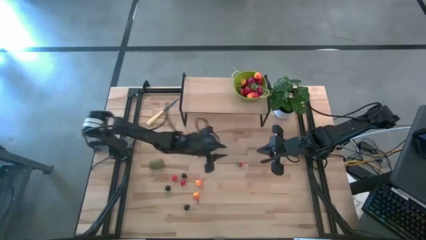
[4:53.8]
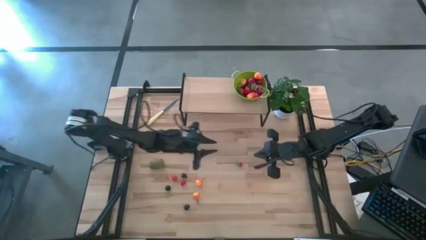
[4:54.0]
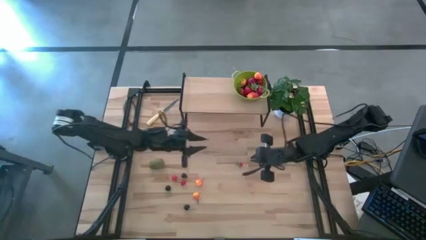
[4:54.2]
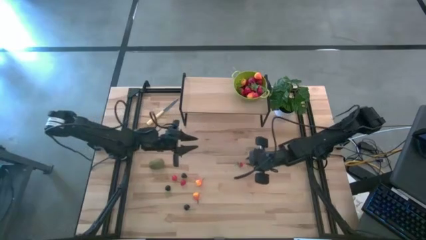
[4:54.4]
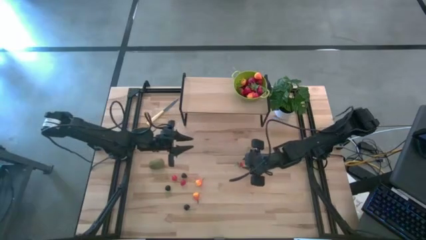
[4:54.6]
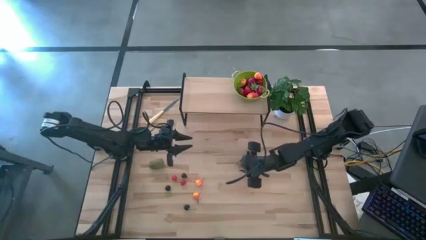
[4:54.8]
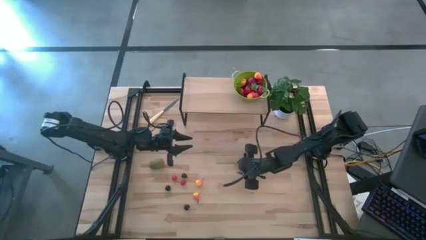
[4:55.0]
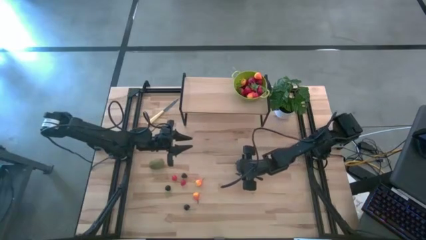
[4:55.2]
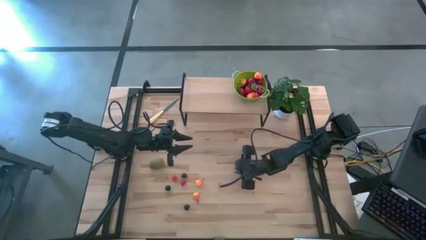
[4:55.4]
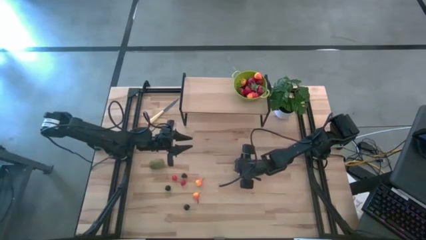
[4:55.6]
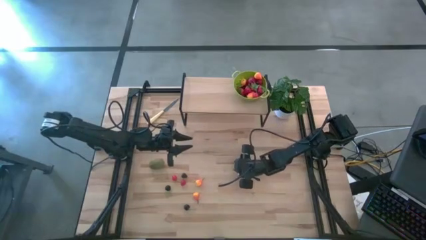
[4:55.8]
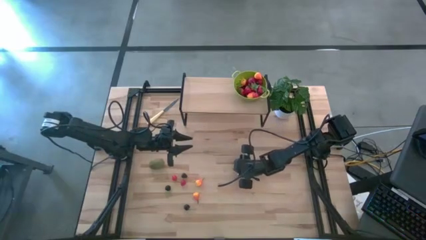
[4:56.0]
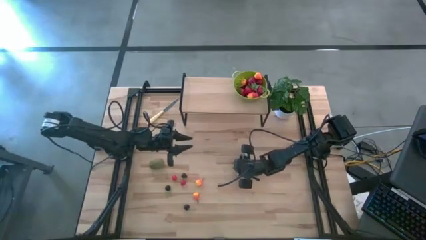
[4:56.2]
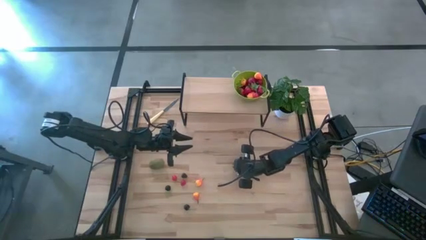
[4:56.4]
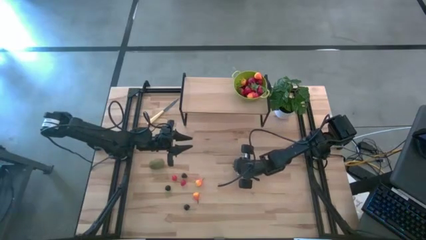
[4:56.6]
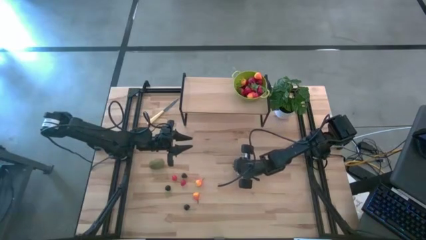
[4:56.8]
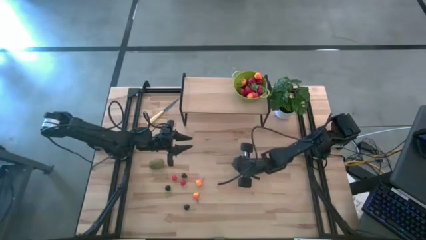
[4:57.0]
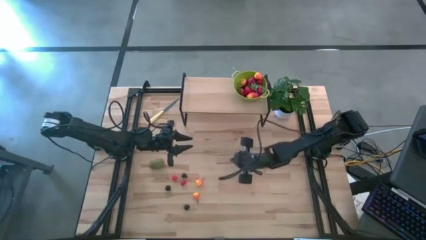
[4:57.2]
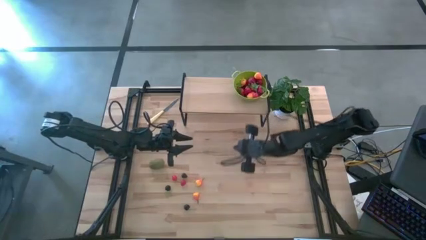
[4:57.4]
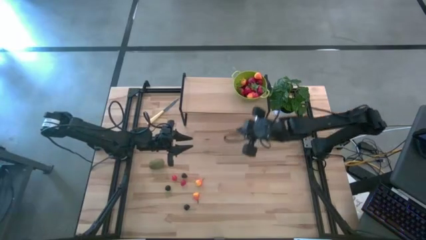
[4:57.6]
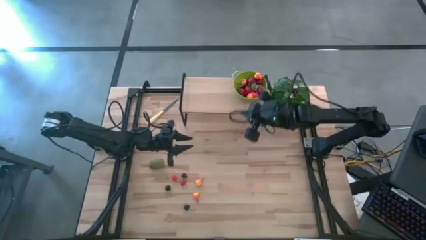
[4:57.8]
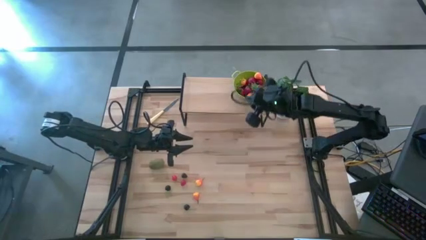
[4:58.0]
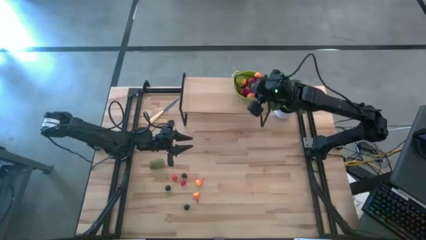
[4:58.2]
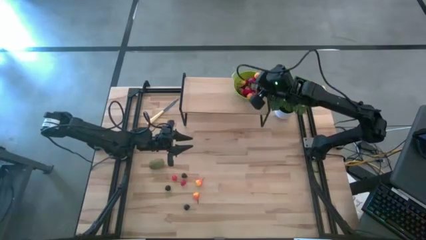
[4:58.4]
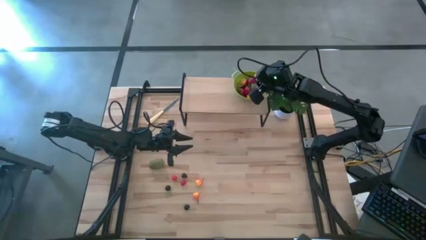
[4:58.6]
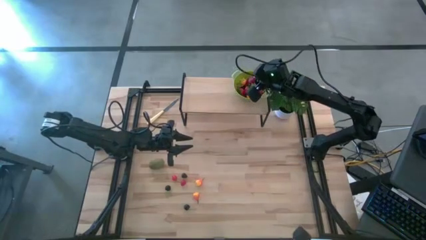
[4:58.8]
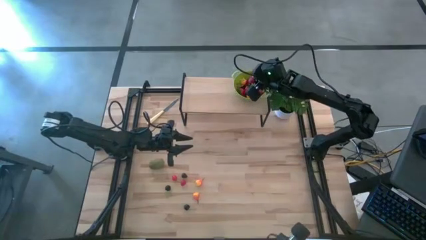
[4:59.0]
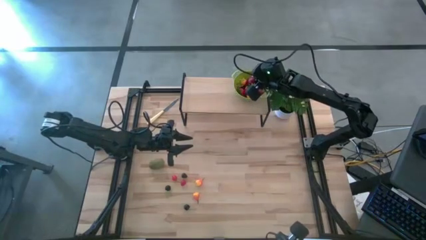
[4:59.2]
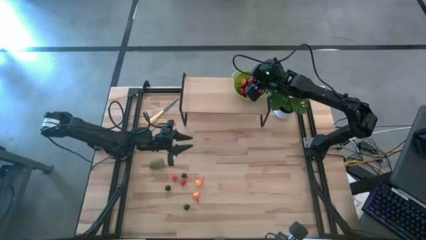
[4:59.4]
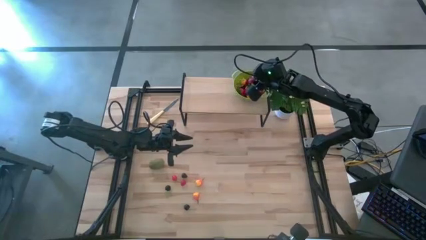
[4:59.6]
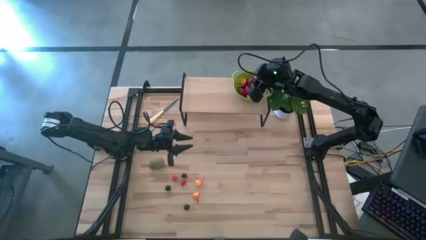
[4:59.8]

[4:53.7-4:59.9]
Task: Build produce basket
Put the strawberry into the green basket

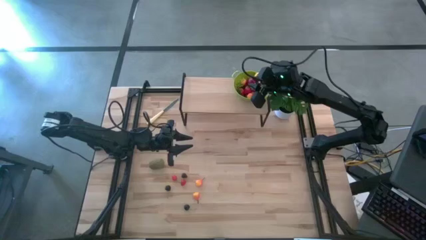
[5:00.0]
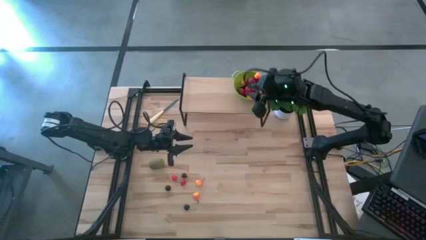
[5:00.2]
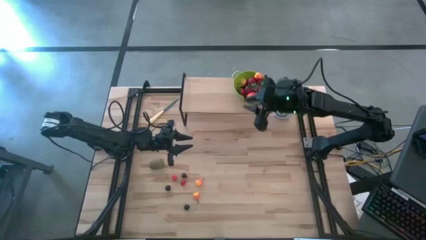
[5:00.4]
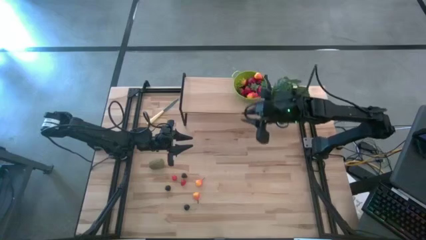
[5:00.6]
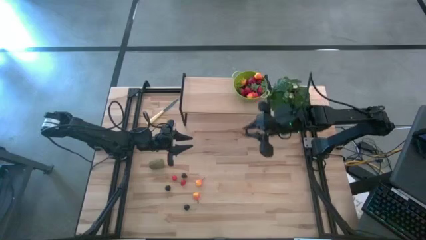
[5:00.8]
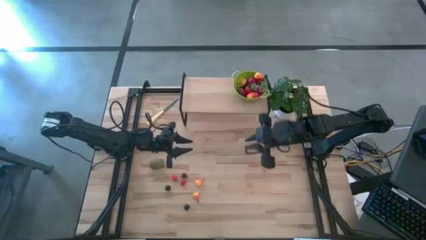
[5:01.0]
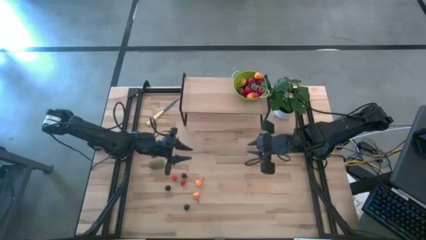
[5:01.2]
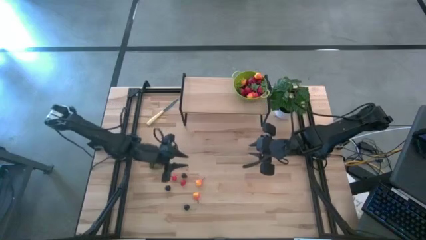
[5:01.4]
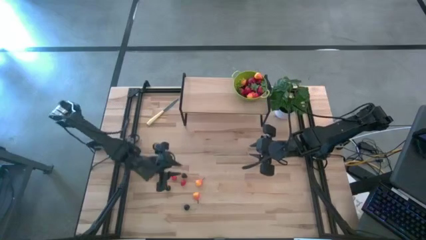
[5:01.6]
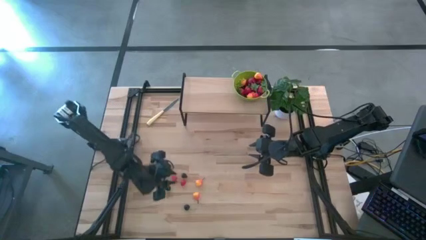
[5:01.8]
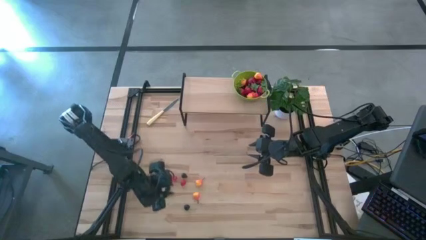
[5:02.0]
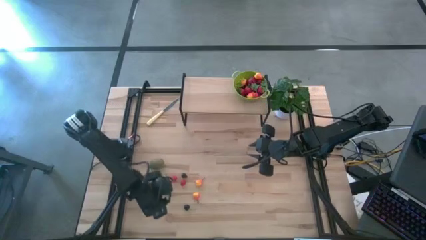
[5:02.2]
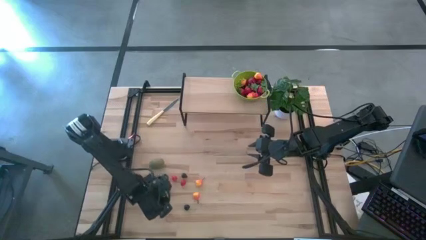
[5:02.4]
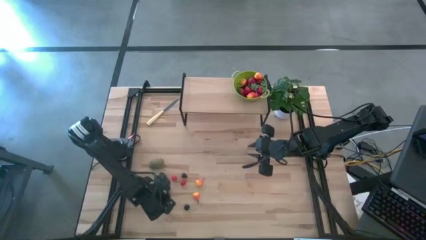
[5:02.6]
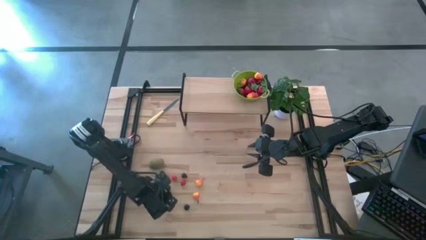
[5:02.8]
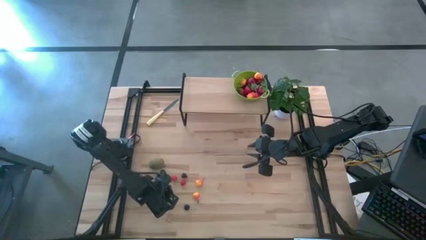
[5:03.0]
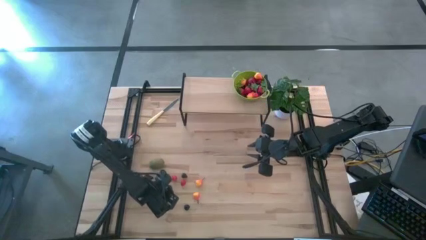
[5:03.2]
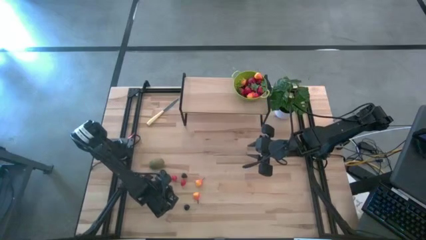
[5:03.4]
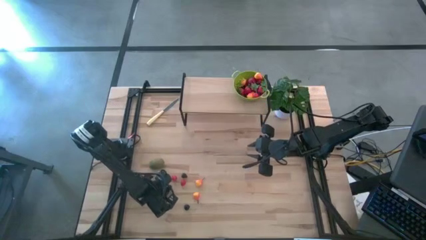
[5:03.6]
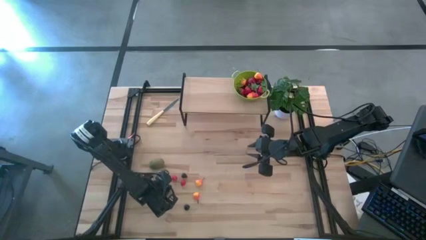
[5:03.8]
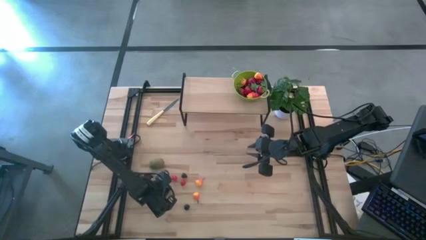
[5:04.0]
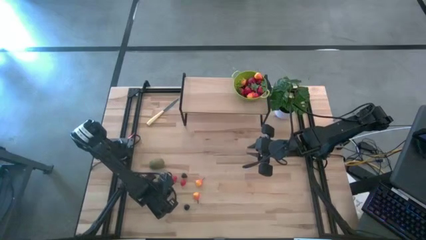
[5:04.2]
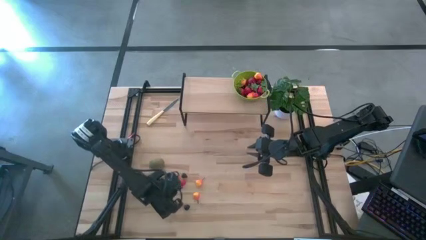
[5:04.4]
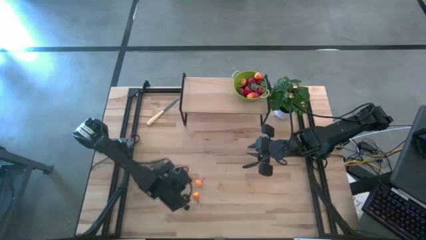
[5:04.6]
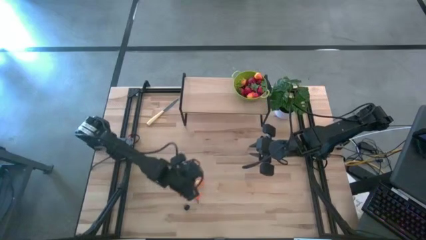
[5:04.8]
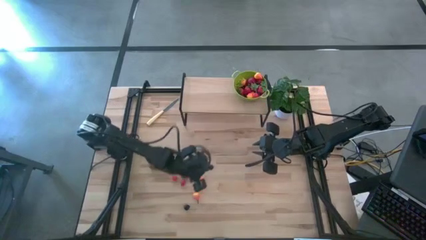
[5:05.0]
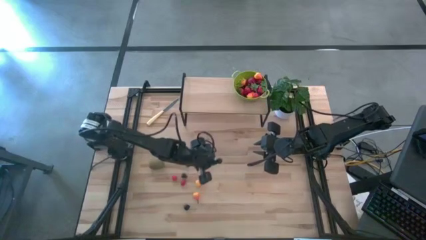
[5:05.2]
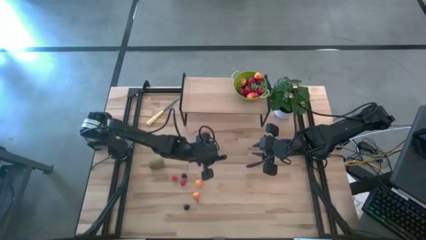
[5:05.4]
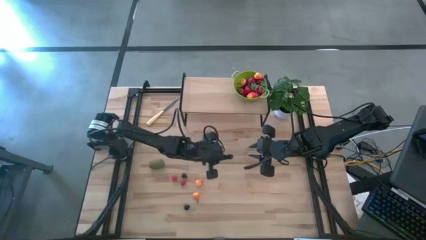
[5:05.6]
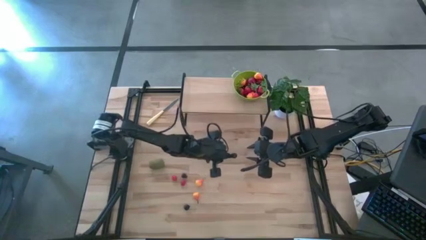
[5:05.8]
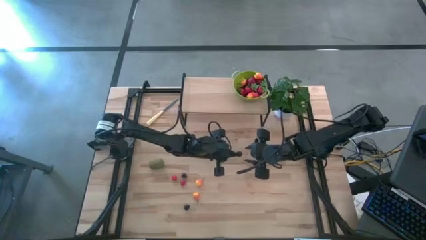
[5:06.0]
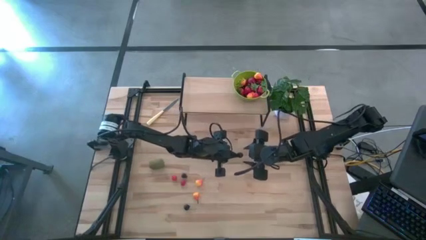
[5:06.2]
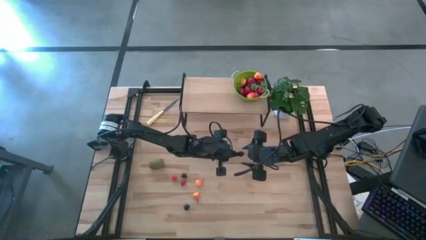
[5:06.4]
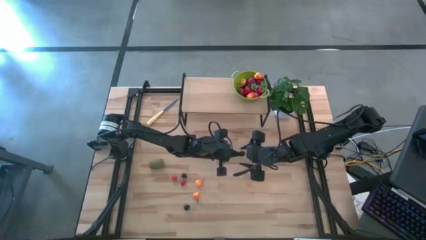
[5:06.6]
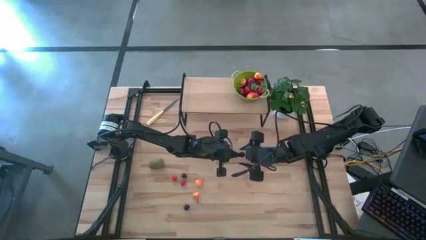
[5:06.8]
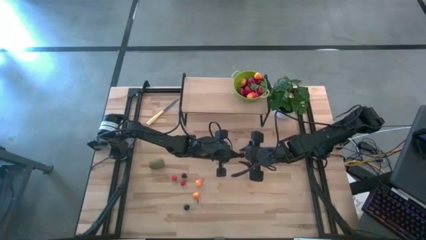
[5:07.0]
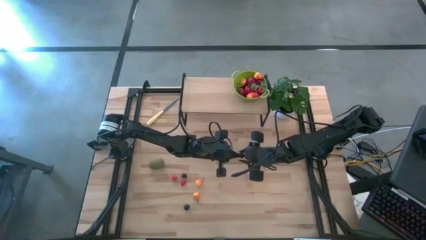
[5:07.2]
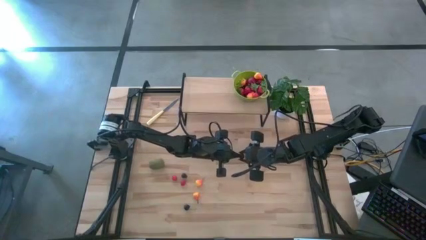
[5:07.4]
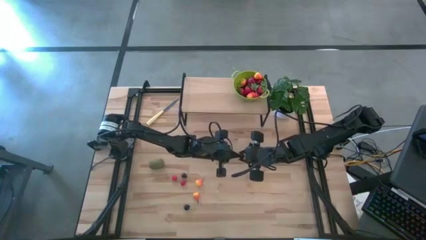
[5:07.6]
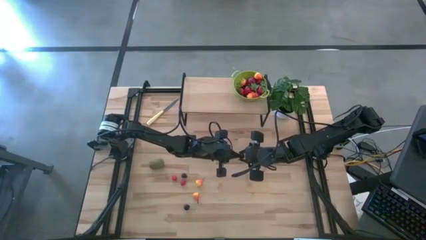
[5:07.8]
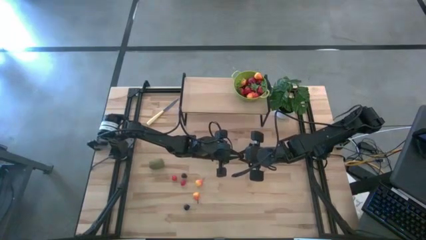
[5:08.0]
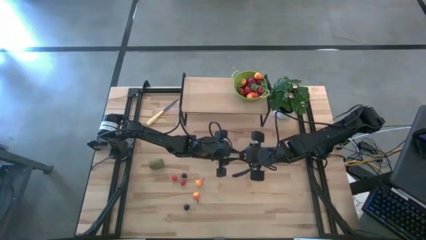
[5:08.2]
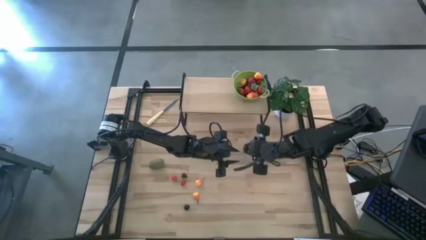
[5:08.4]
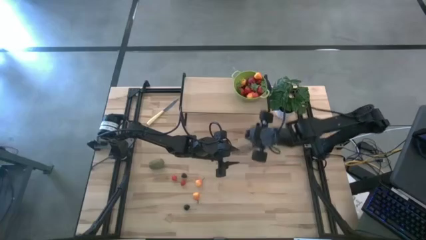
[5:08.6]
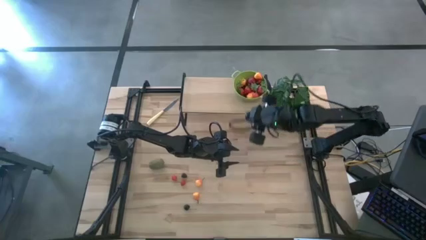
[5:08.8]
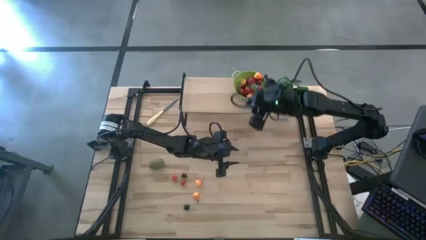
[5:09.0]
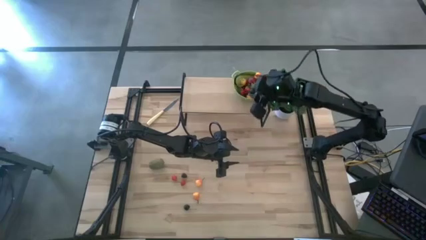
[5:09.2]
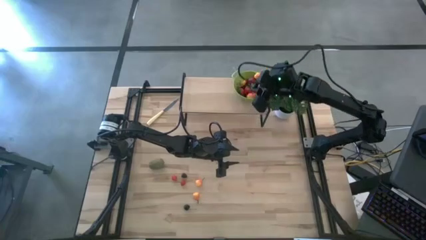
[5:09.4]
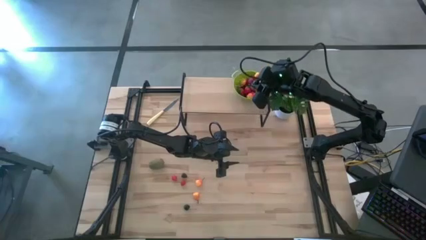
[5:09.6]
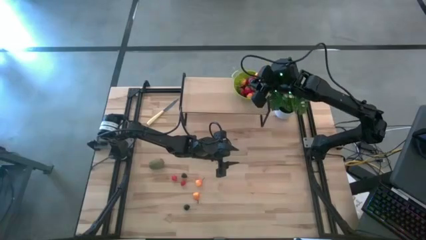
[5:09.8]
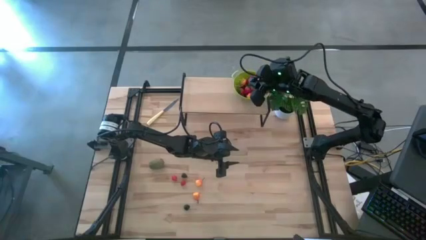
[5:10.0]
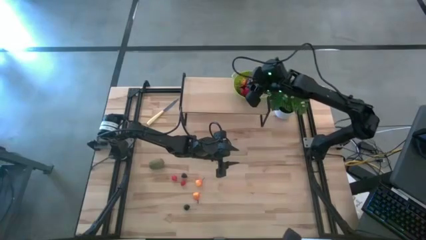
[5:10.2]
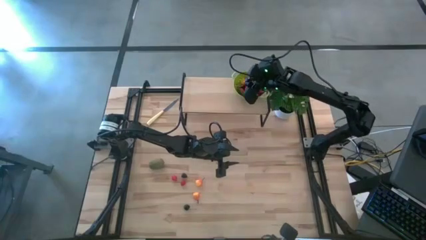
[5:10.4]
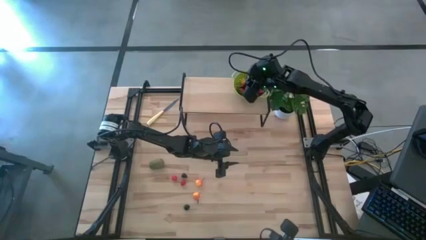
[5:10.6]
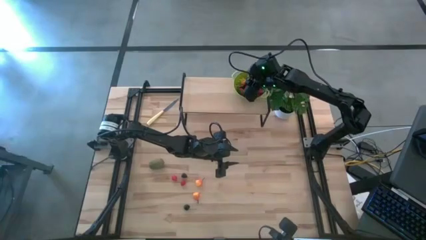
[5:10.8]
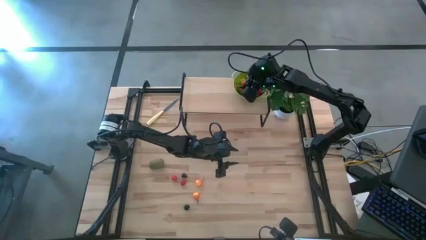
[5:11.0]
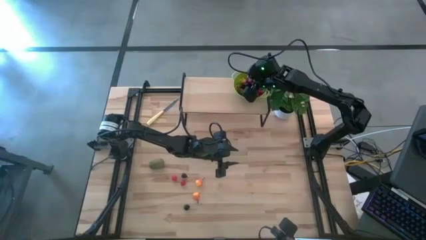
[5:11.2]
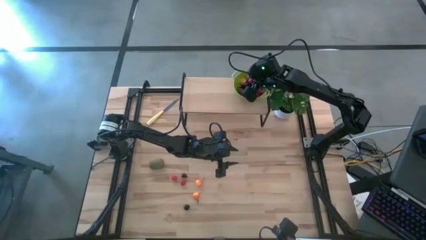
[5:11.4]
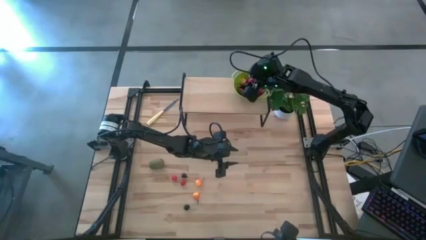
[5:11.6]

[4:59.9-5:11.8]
Put the black cherry into the green basket
